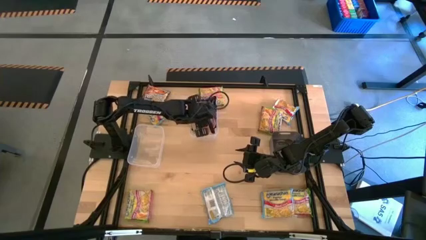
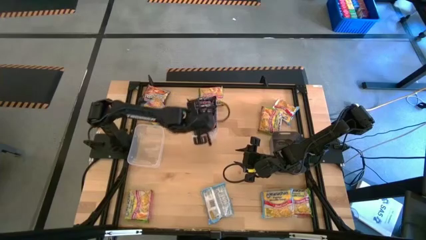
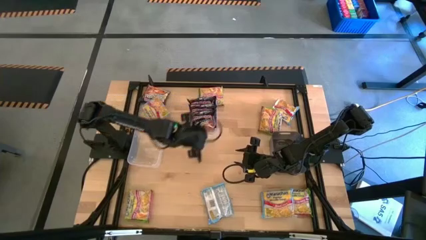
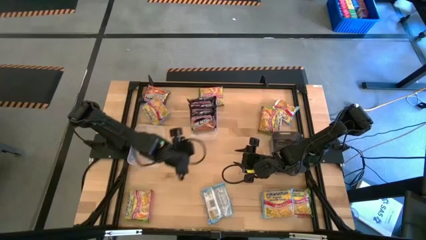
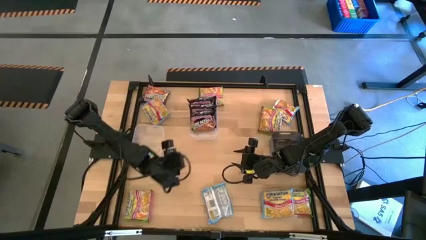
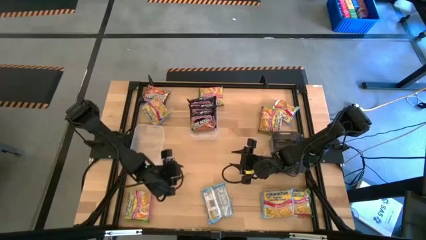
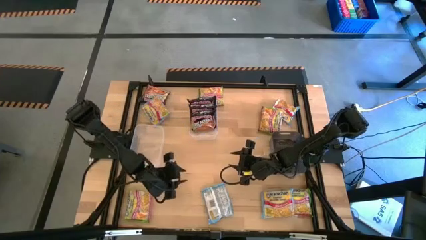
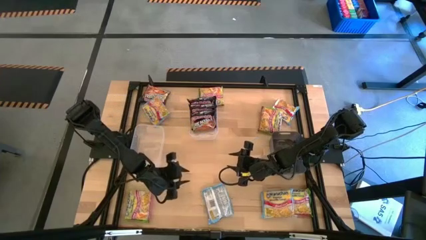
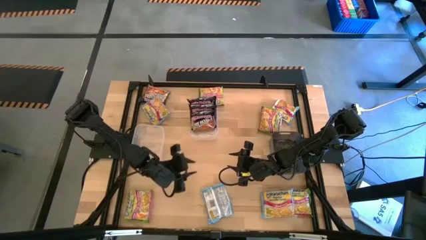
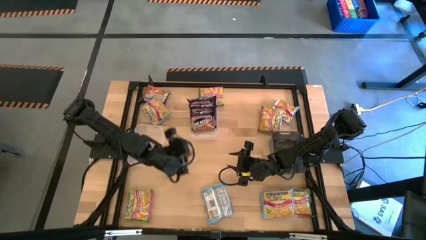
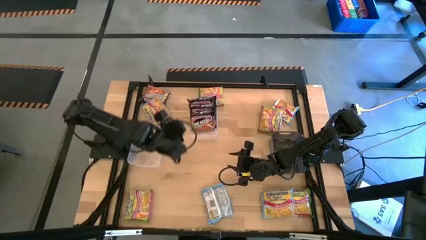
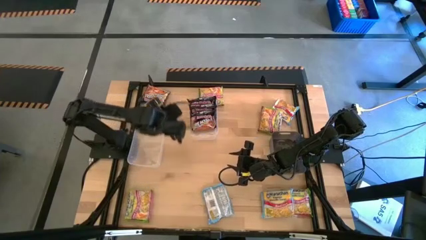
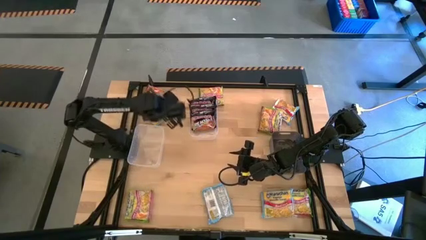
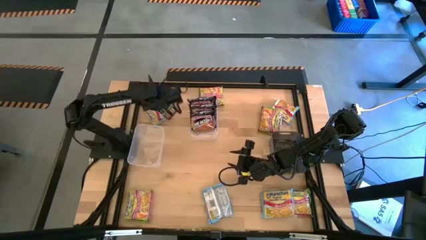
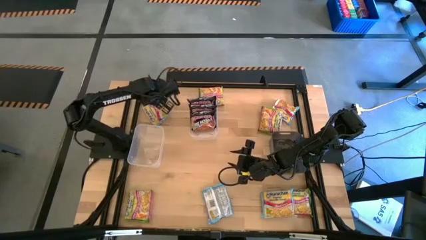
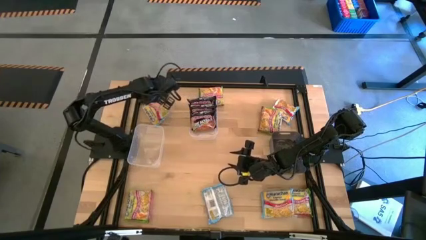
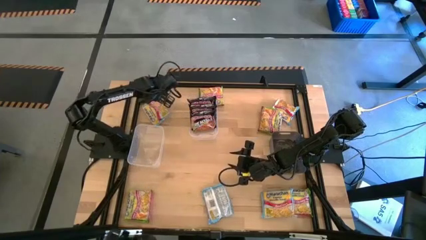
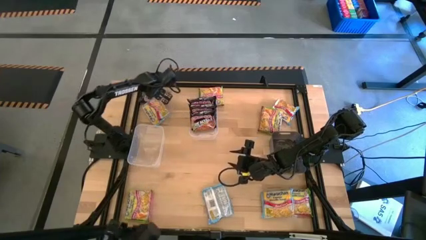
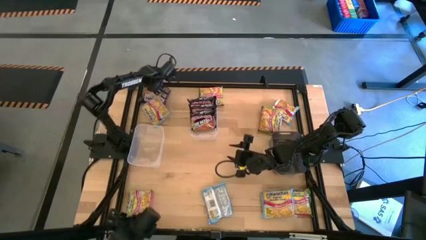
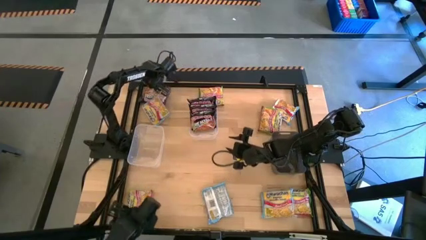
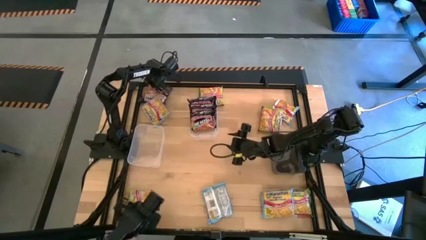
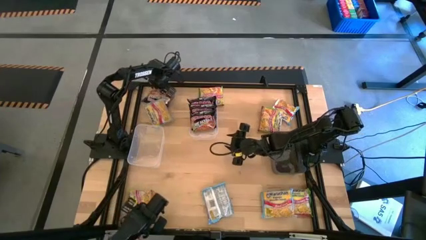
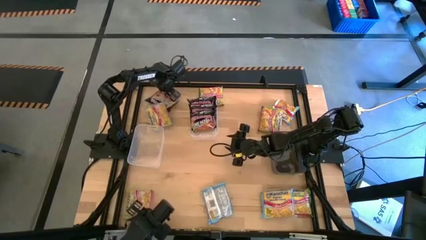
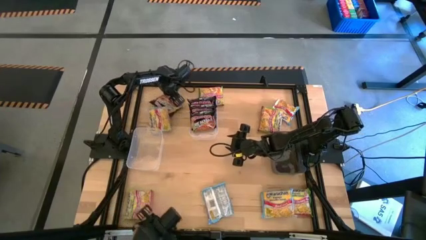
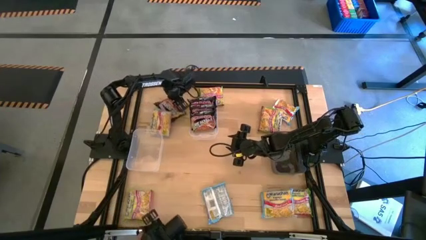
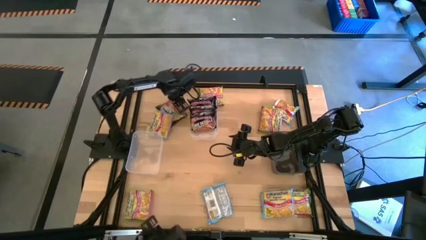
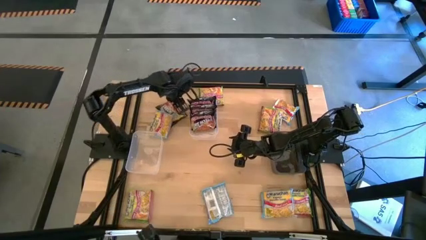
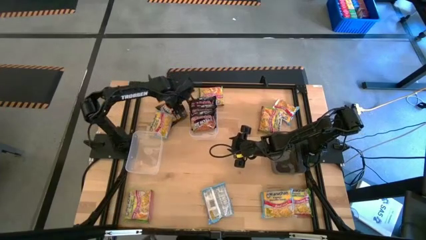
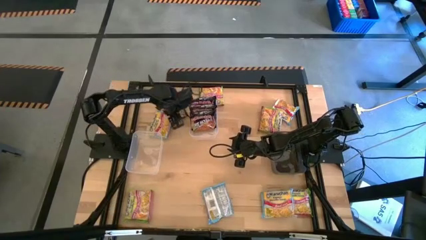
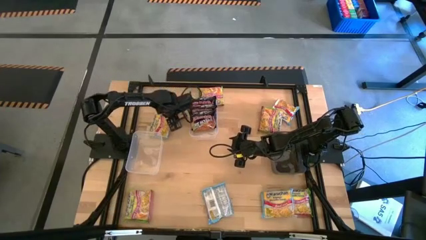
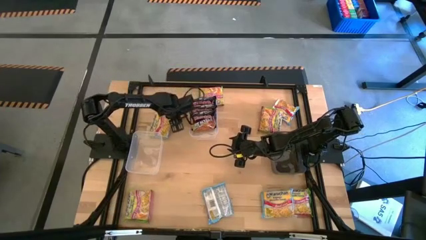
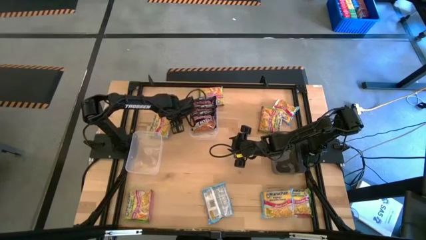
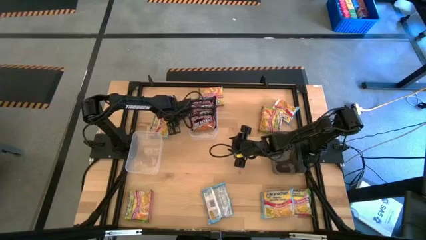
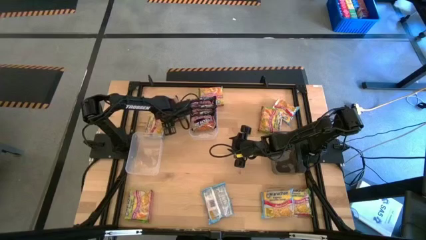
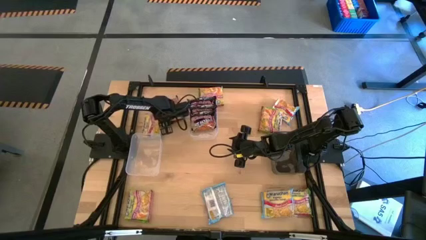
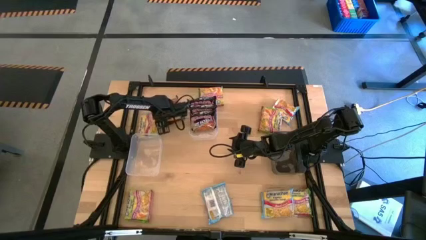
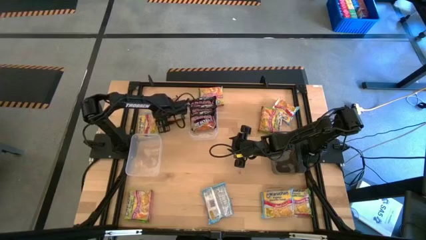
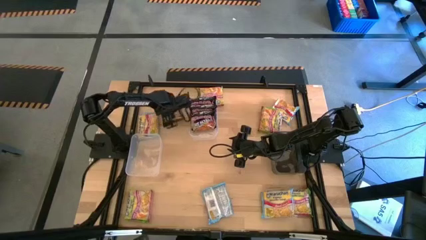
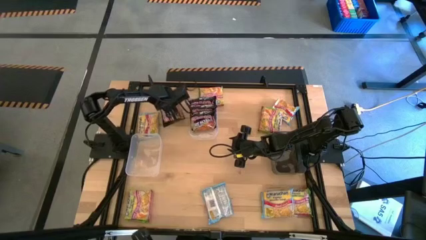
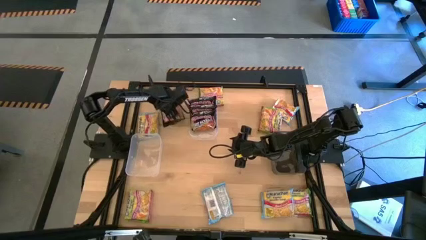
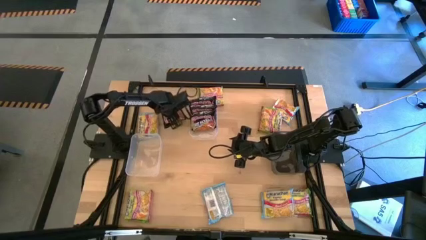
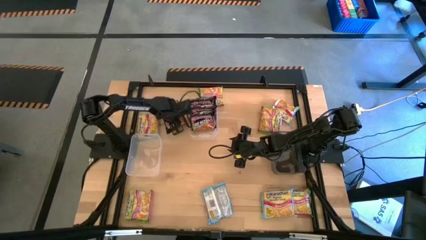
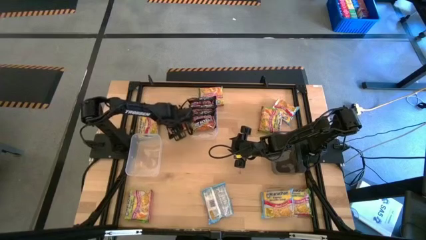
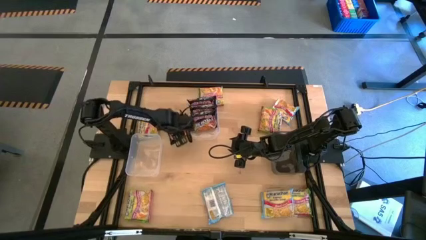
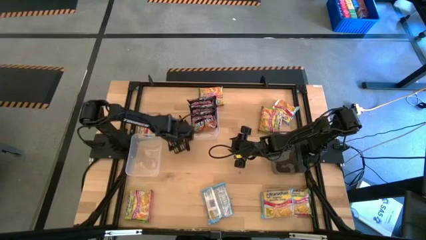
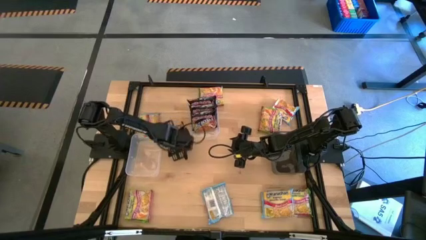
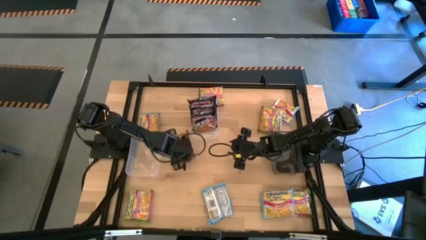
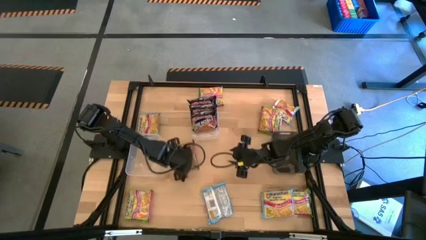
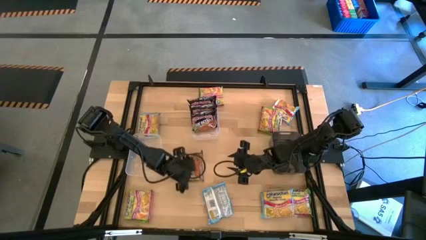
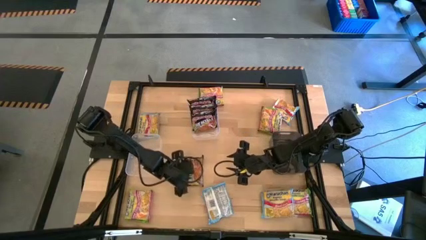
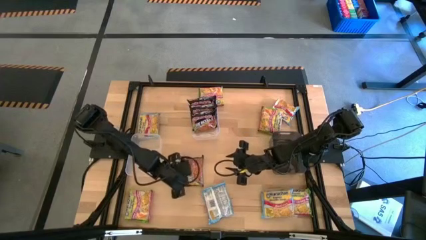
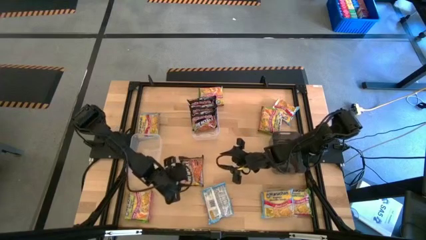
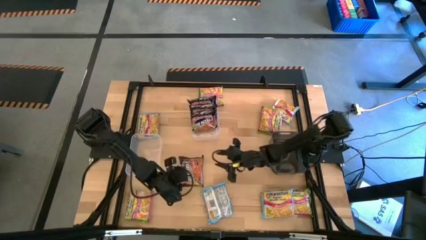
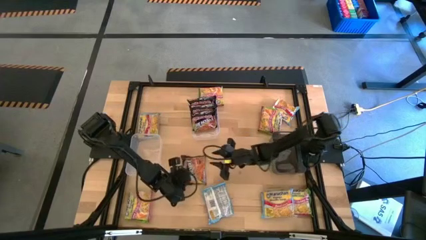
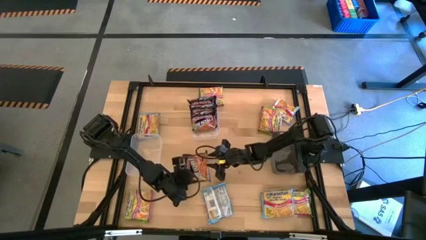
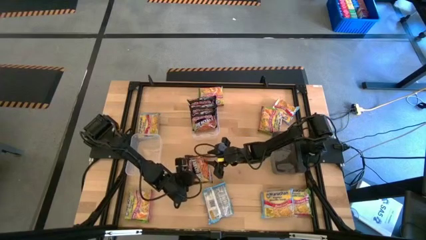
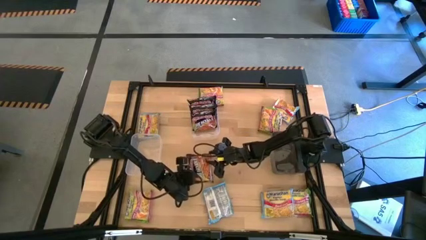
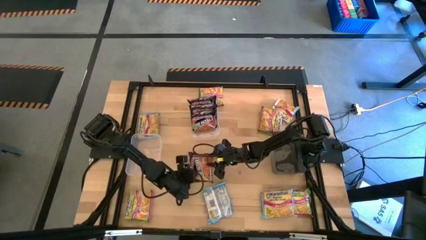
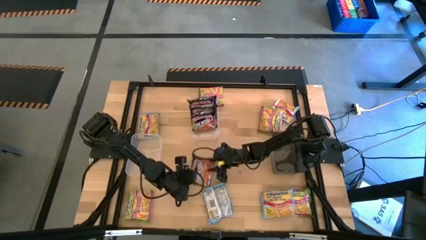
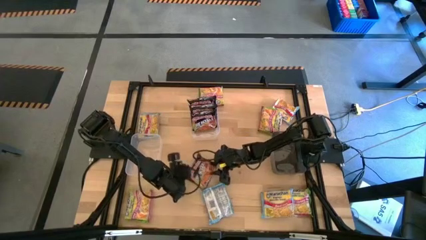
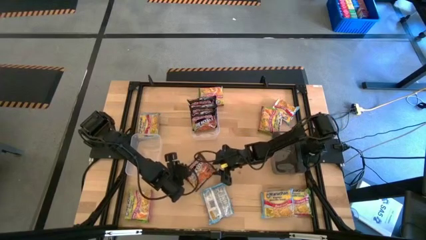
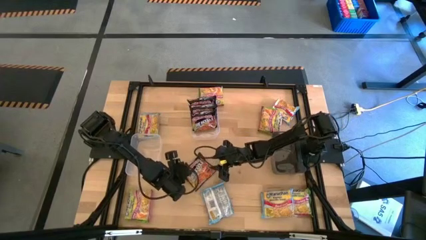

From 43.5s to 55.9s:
Task: Sort Maruchan noodles
Put the black noodle pack into the right transparent bin
